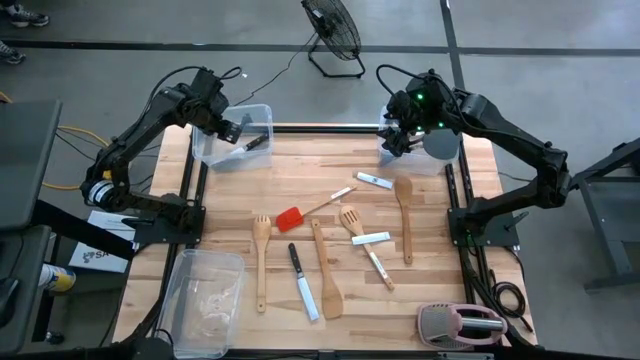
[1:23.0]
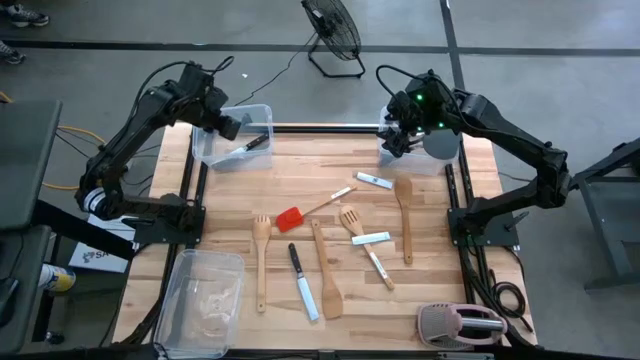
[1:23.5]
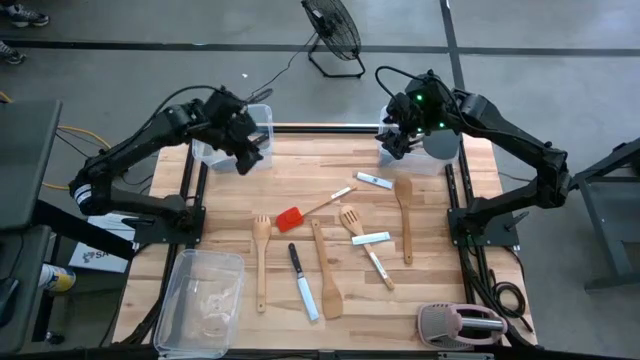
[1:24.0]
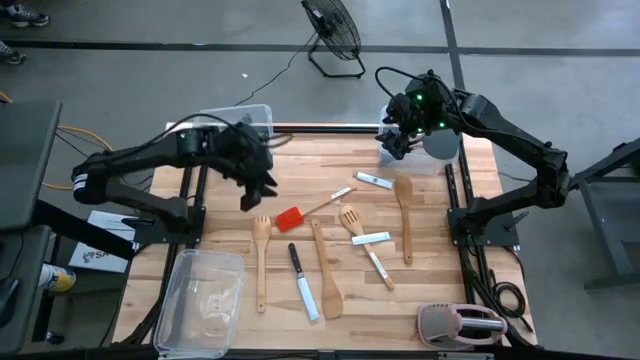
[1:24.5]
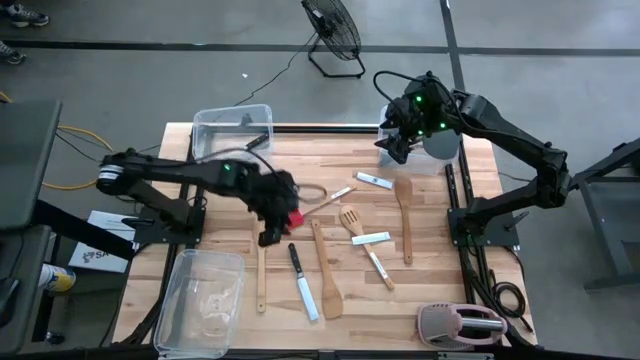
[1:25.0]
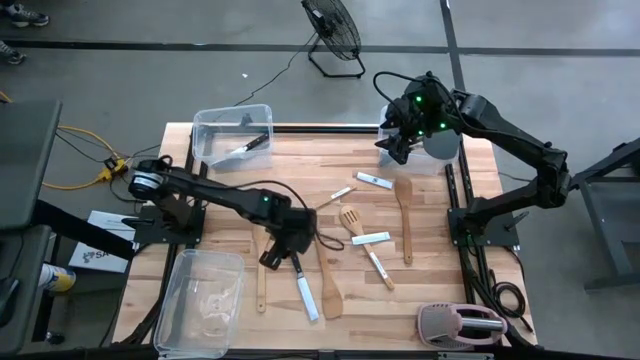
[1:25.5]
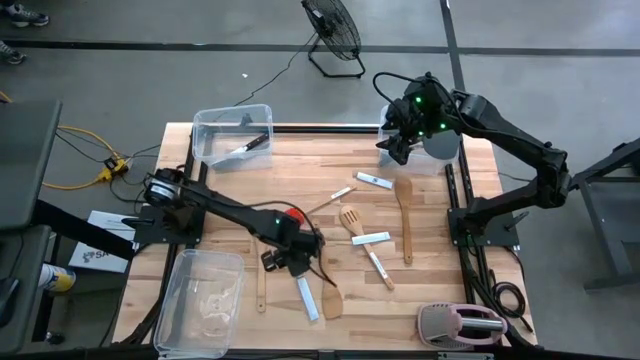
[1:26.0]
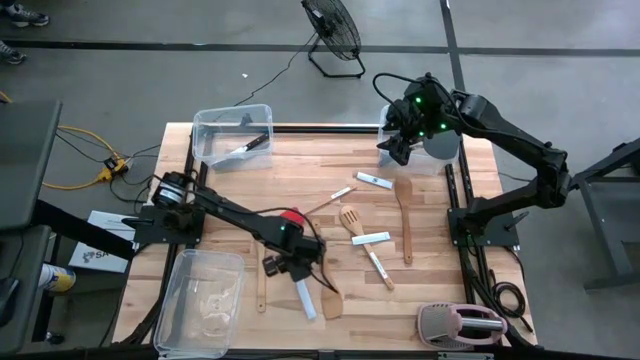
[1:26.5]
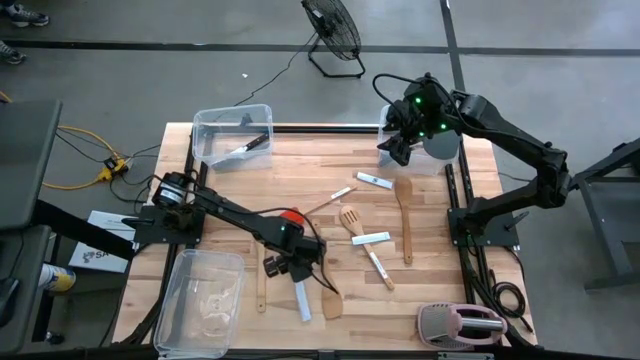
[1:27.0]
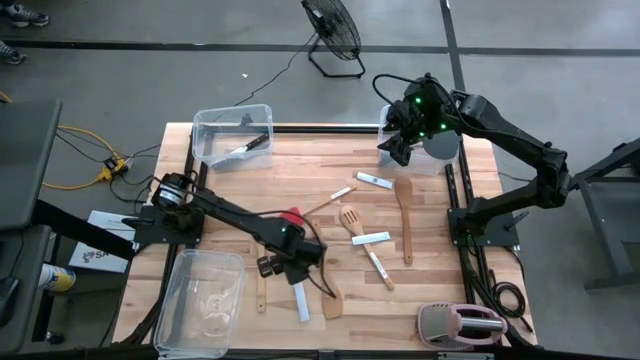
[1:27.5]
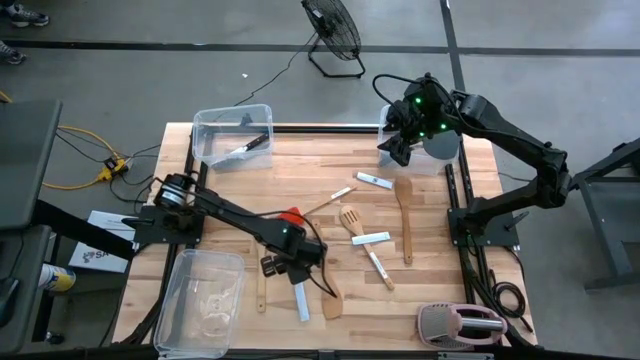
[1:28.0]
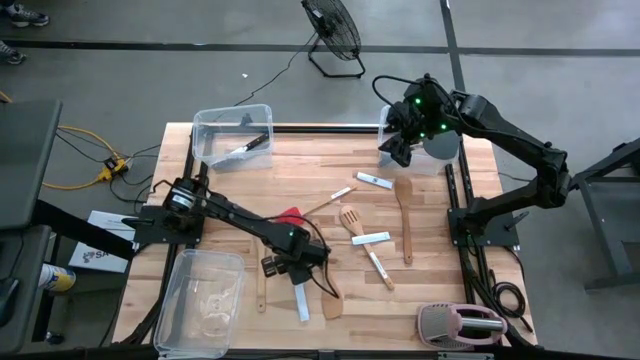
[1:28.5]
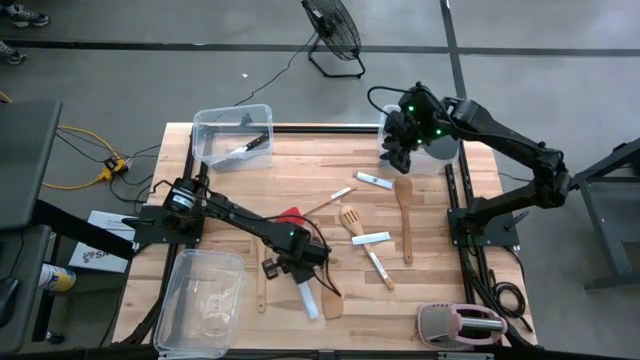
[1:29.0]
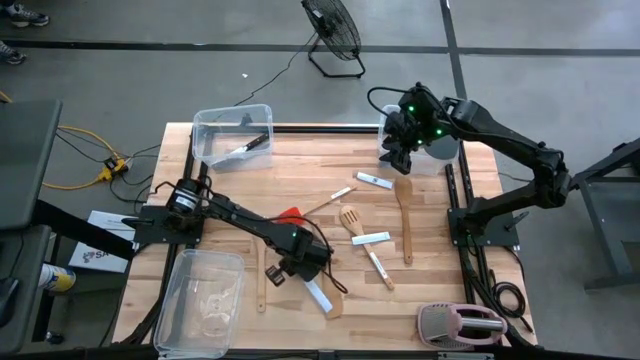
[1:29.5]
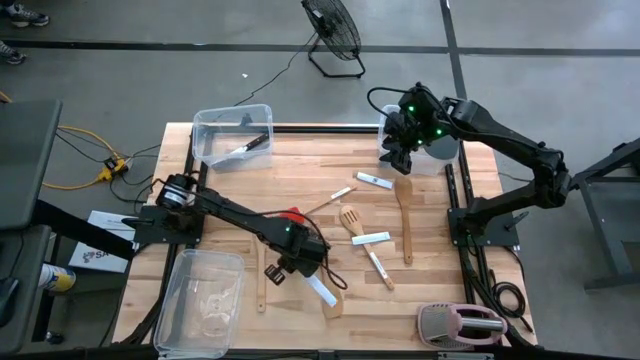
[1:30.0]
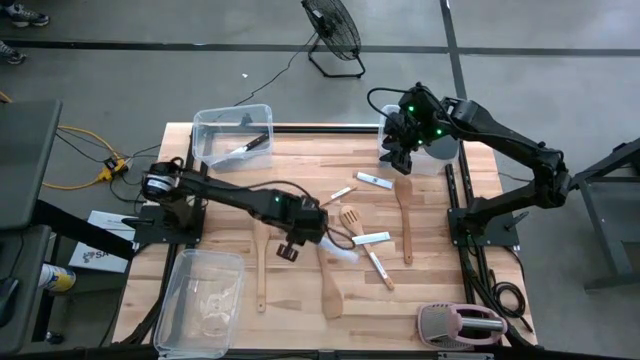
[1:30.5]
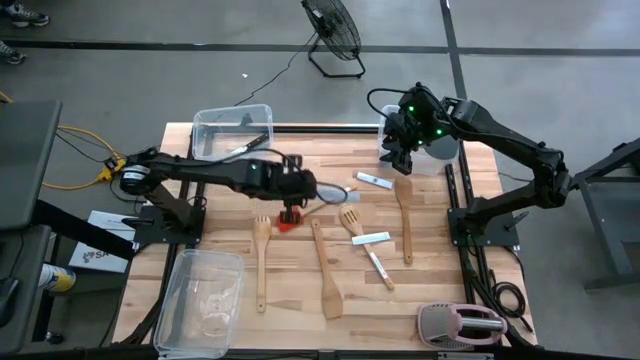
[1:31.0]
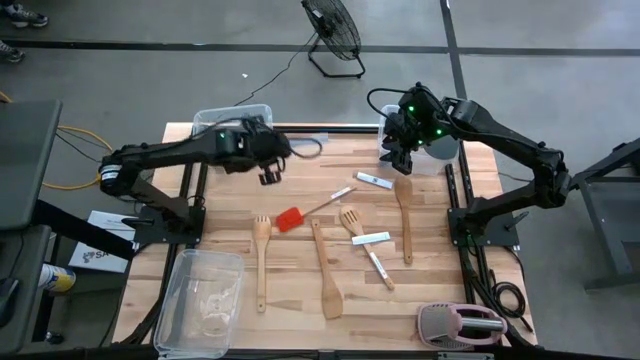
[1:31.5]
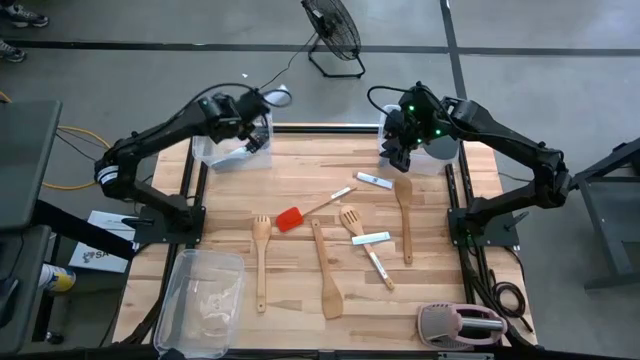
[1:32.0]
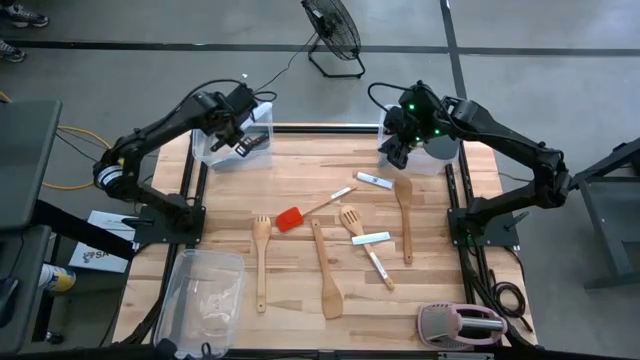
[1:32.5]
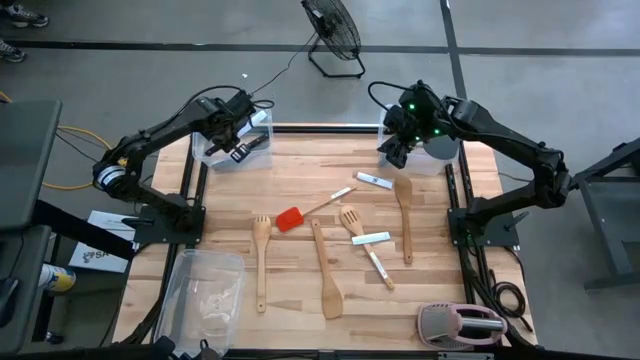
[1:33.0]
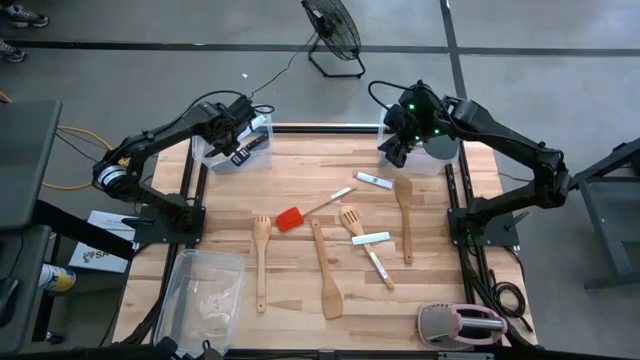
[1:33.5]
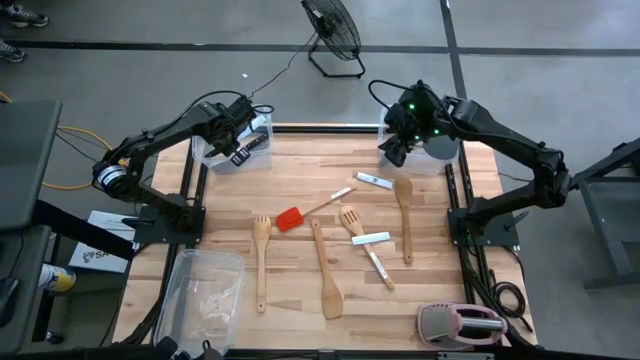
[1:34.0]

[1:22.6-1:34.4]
Task: Pick & Place Kitchen Items
Put the black kitchen knife into the top left transparent bin

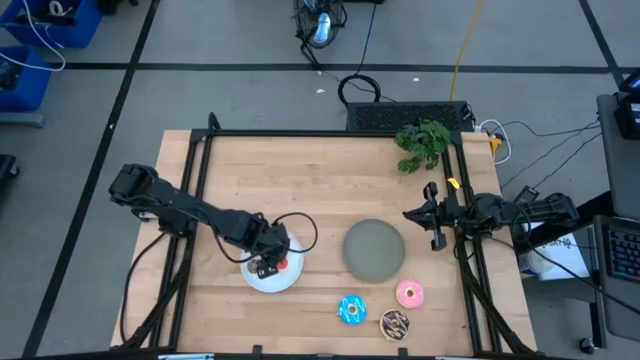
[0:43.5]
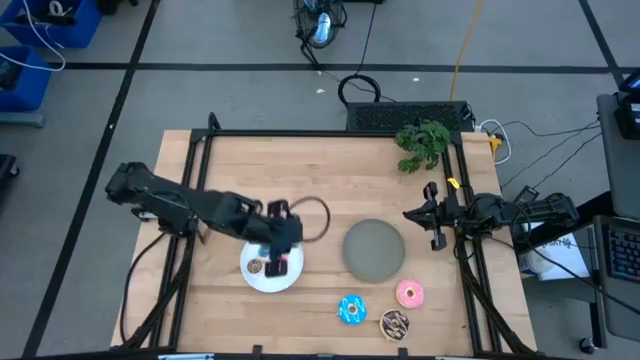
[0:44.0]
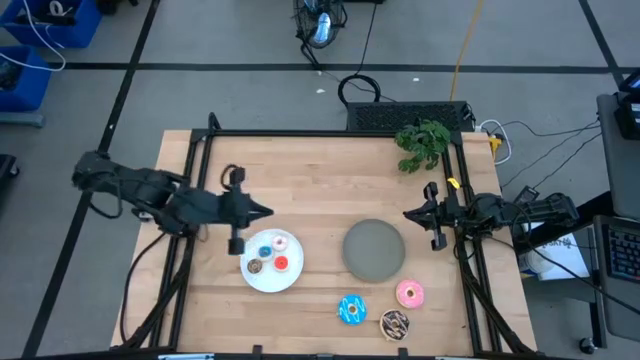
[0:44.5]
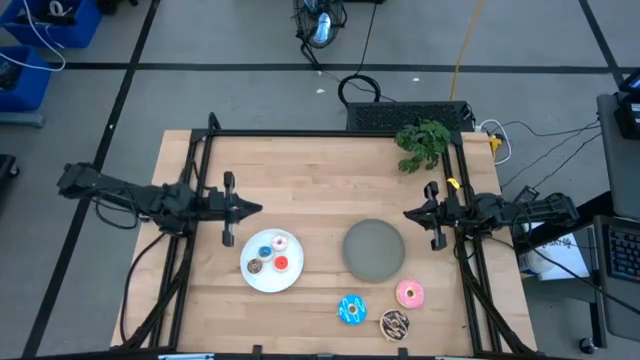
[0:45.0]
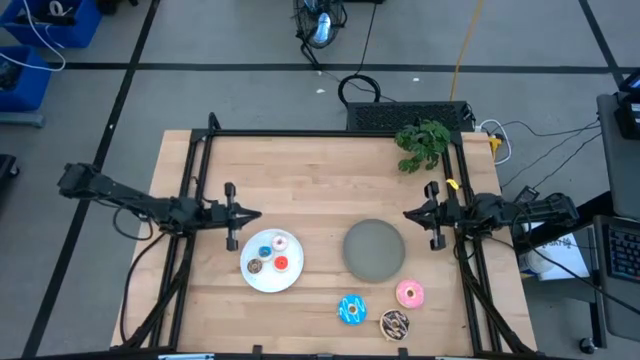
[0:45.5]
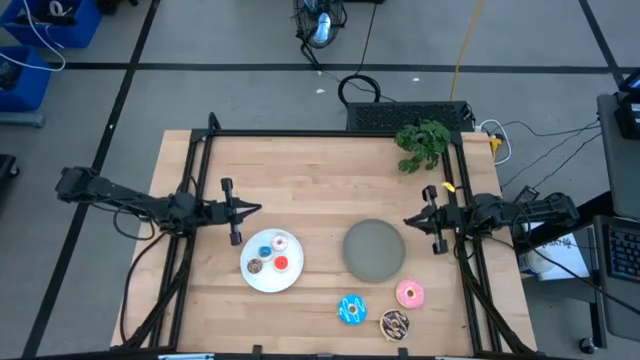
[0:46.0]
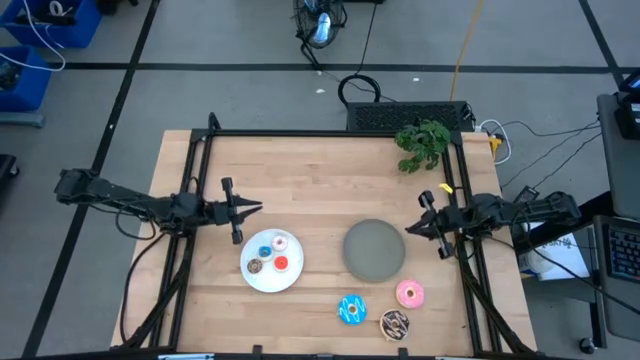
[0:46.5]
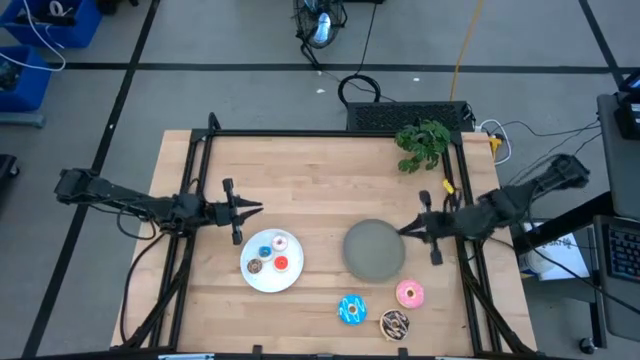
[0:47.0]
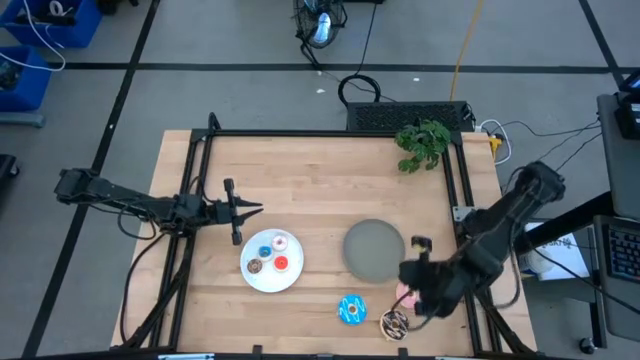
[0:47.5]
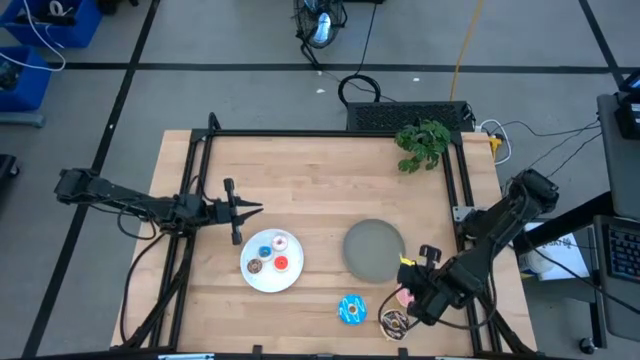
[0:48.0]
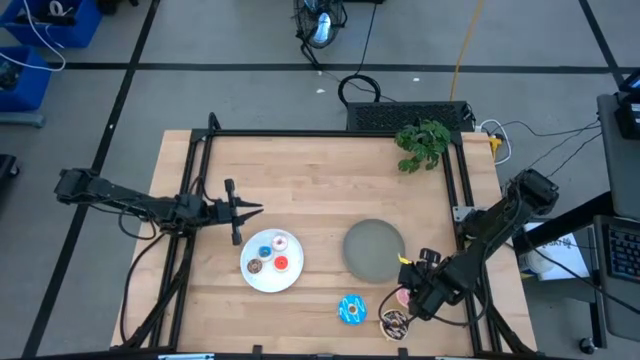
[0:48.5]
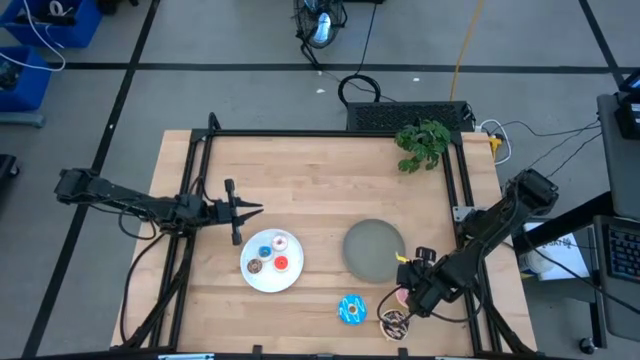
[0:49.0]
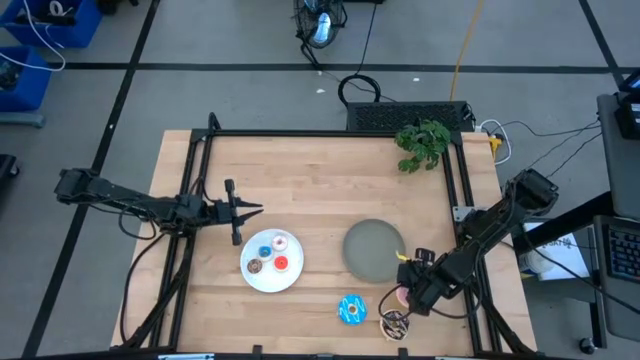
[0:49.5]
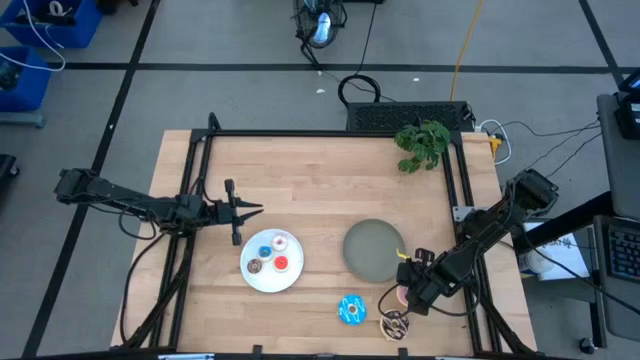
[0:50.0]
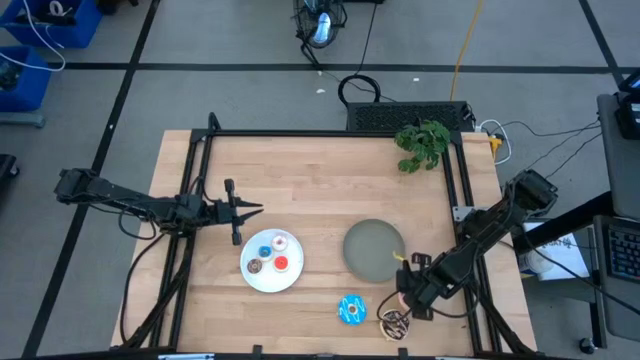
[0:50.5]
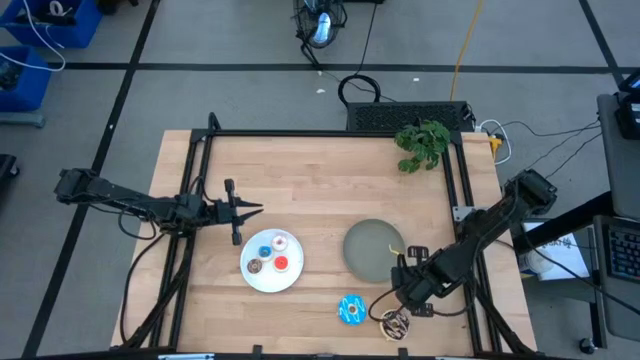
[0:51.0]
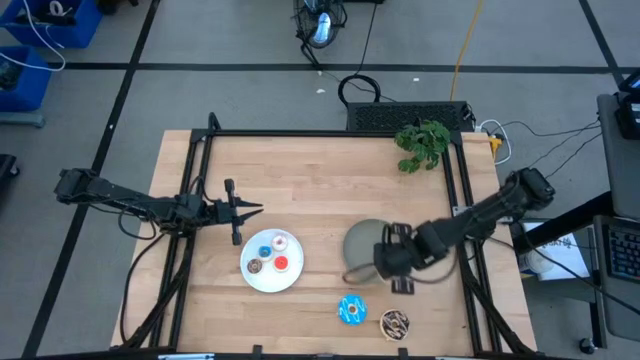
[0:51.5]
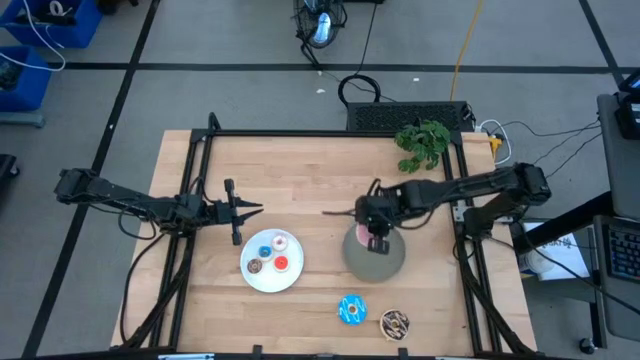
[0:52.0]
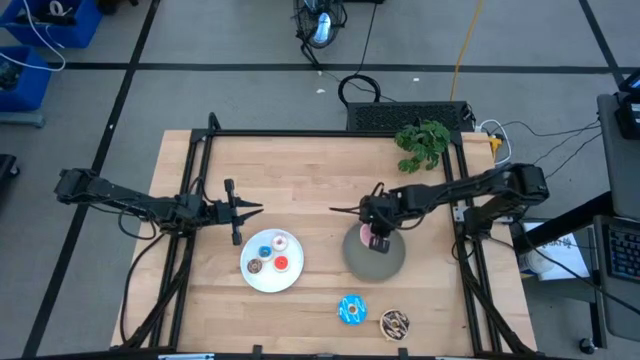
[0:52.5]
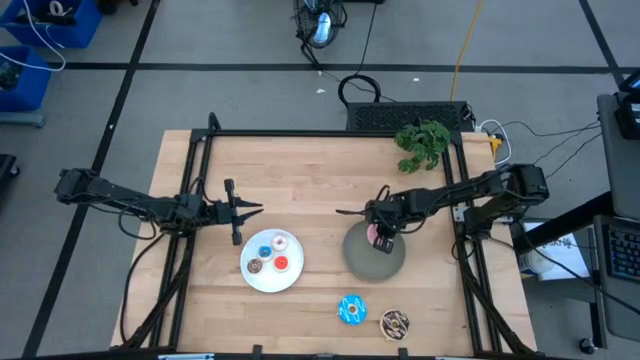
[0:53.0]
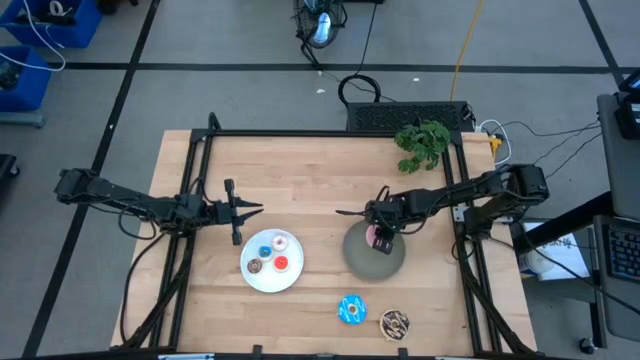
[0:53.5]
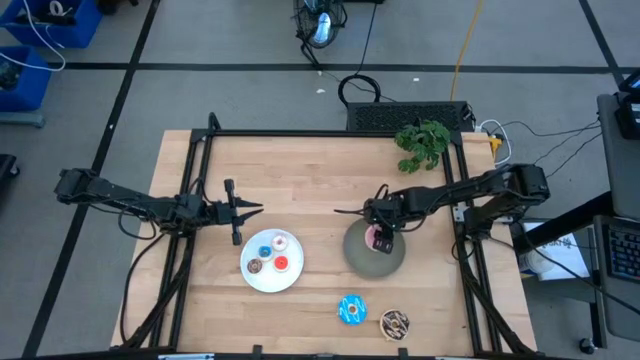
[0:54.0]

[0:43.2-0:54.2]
Task: Pick & Place donuts
Put the large pink donut on the gray plate
